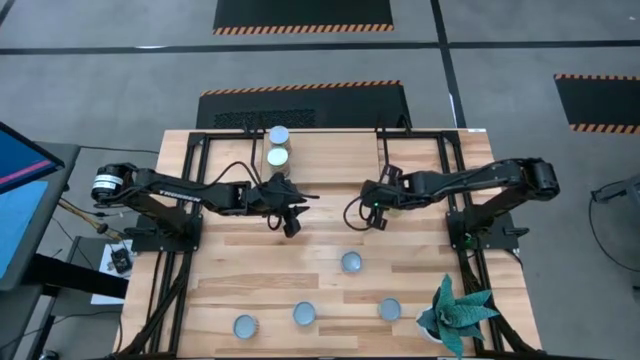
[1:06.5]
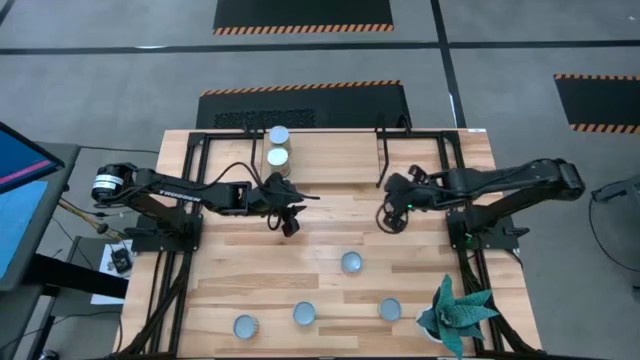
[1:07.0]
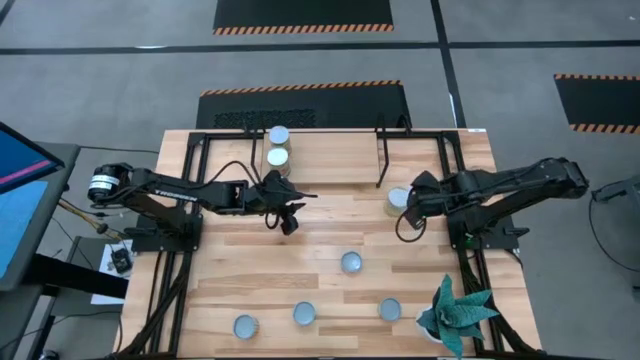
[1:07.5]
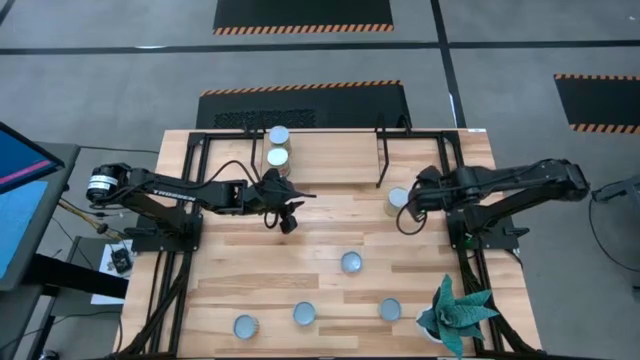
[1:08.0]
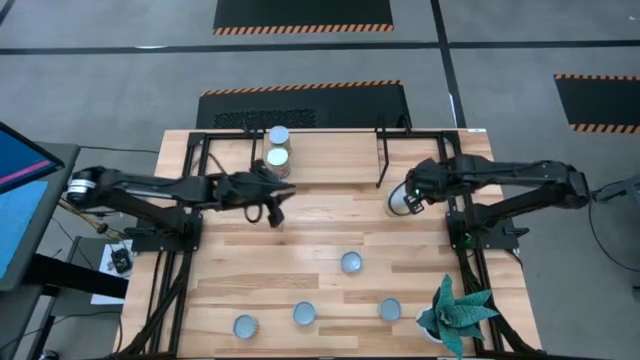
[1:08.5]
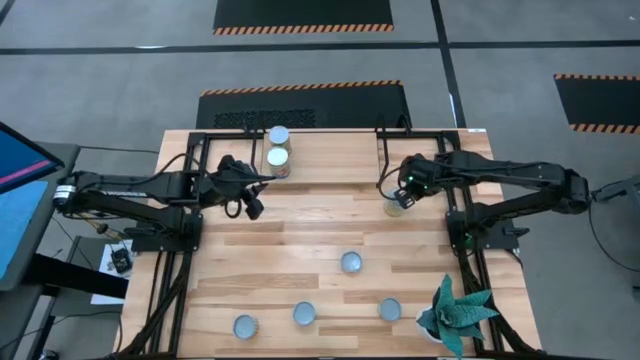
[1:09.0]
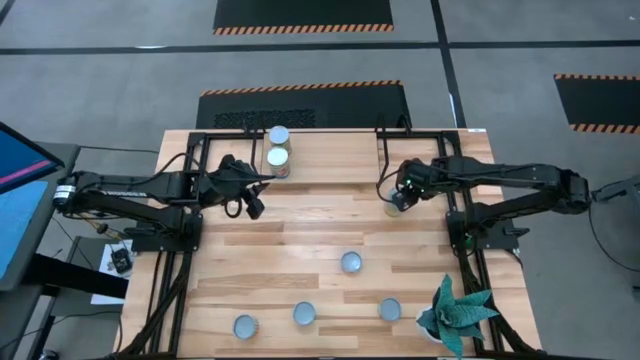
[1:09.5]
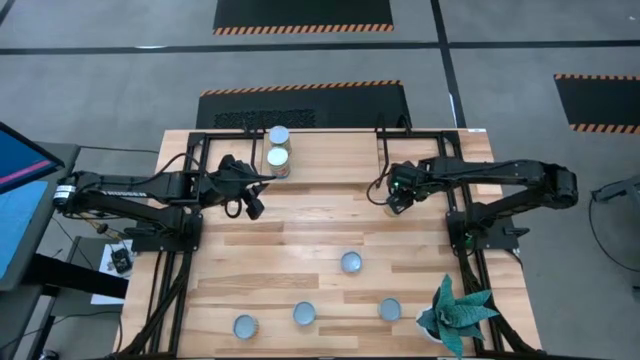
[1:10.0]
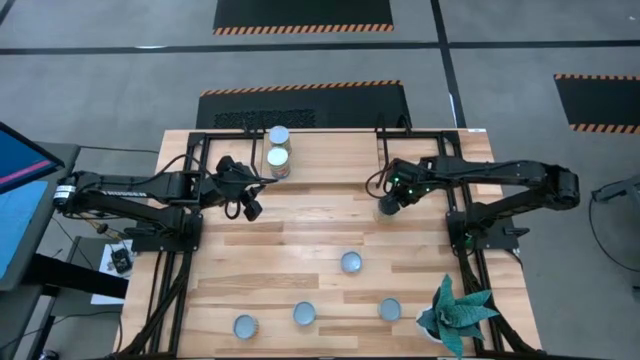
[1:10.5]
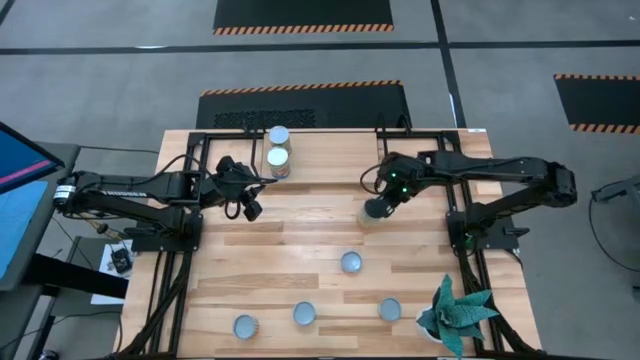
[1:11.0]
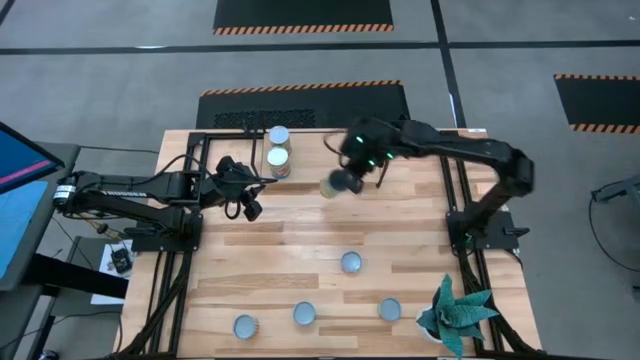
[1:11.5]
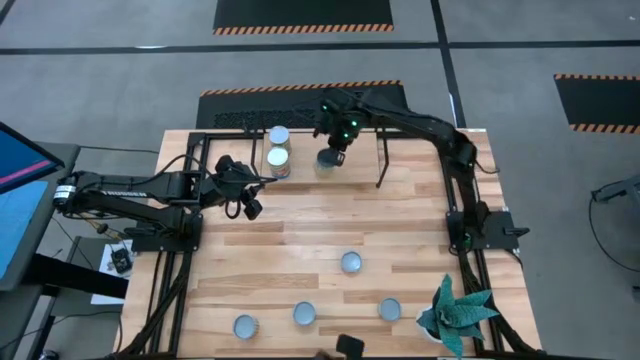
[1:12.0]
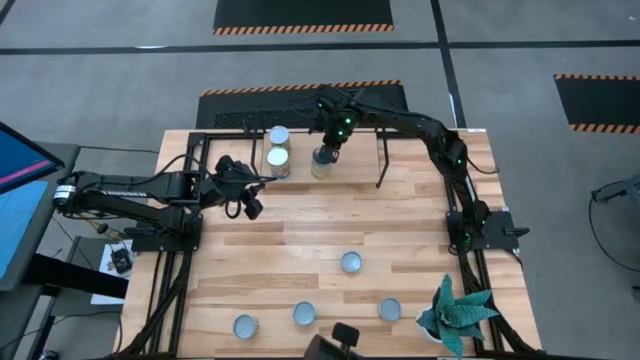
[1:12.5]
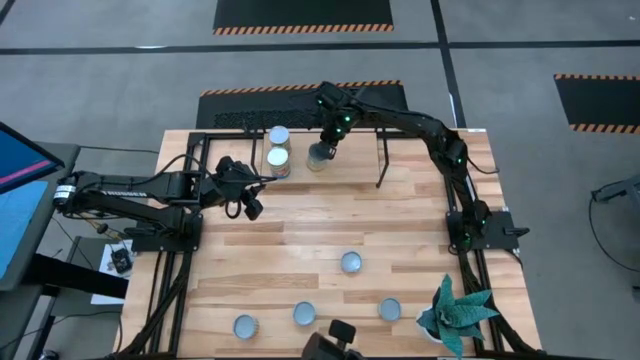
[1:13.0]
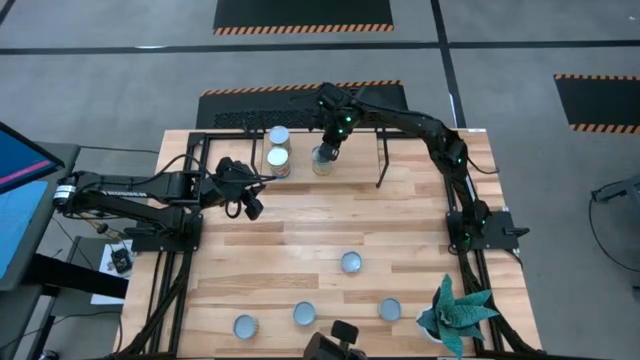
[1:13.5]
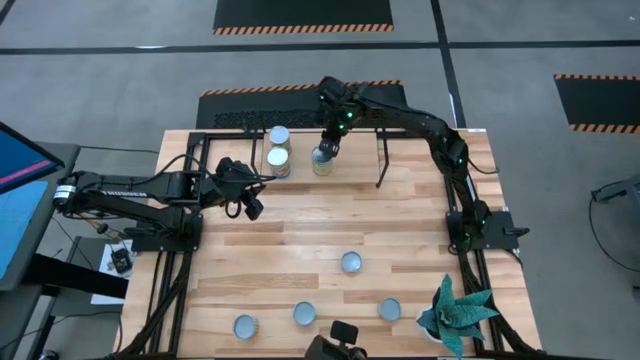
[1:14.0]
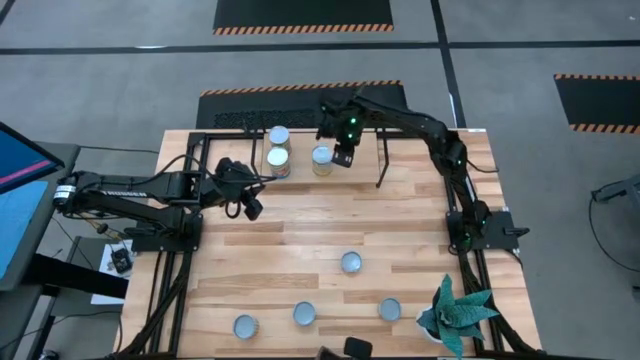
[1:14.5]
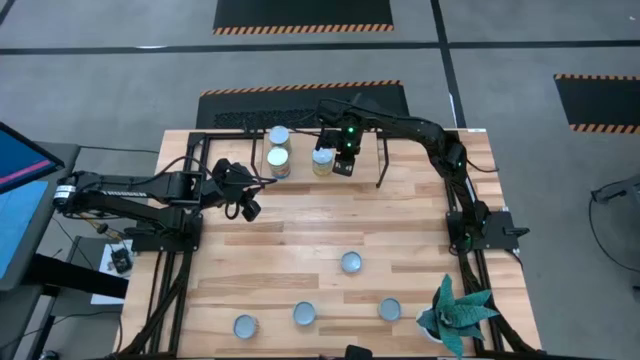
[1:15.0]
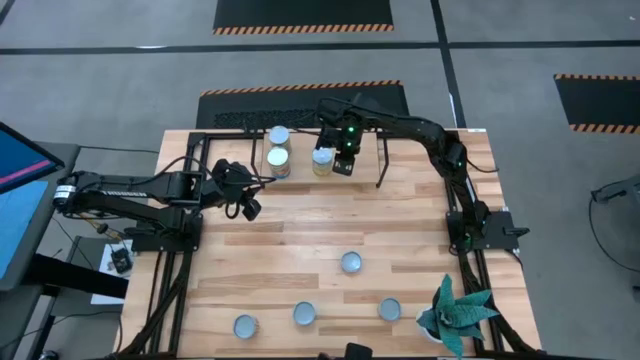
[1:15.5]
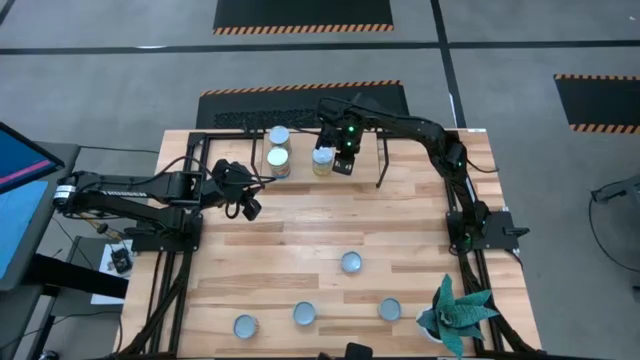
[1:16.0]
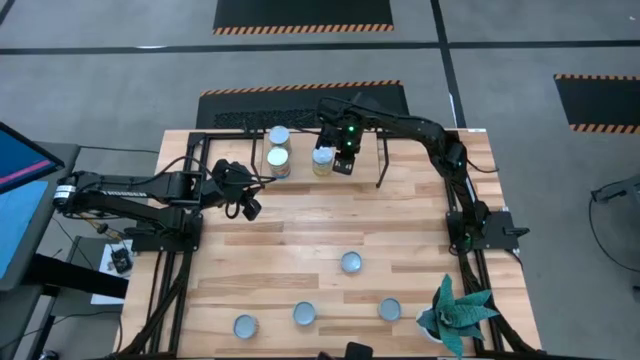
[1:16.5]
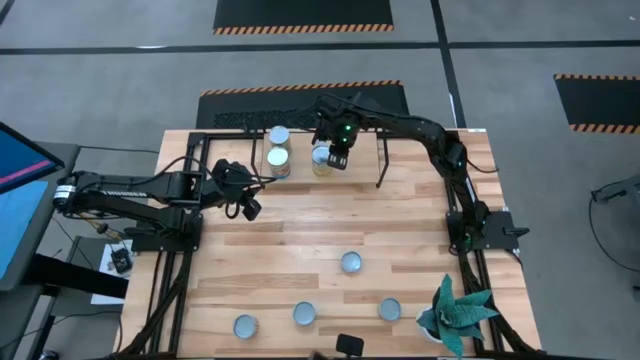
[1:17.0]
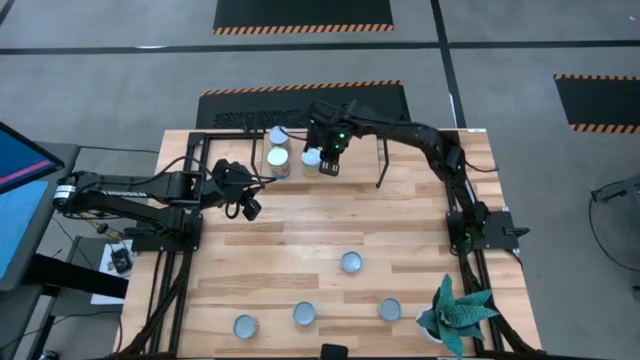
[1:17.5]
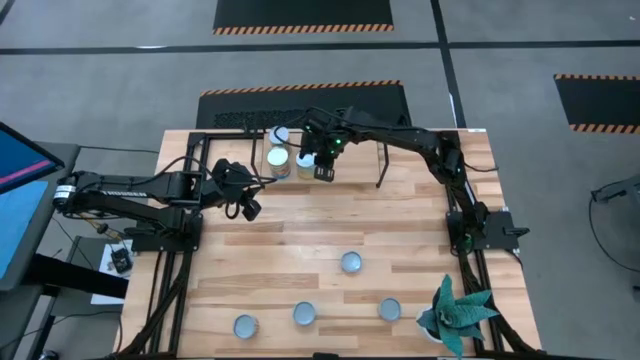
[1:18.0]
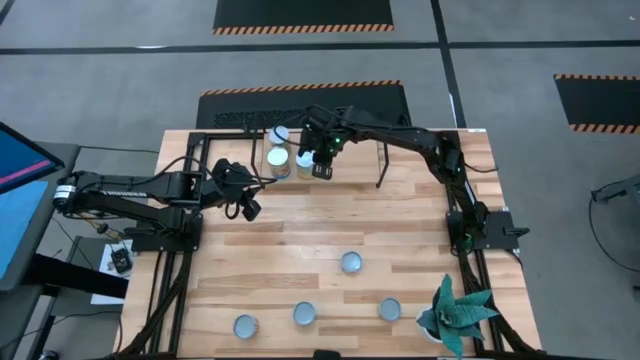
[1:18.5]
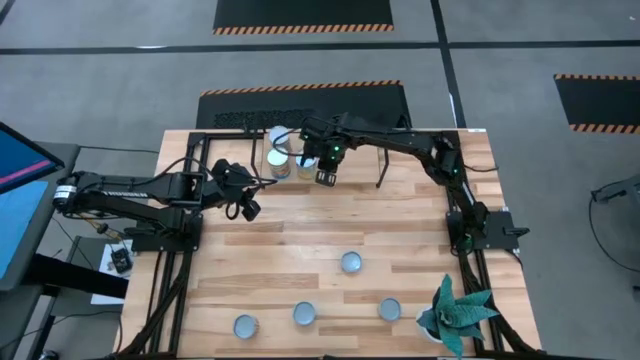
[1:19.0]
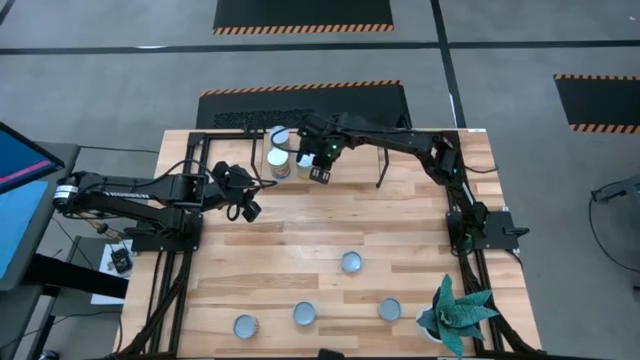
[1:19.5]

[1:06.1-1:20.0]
Task: Pick and place cans onto a shelf
Put the canned carrots on the shelf

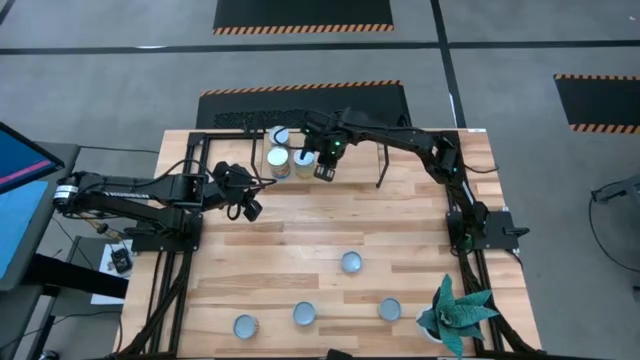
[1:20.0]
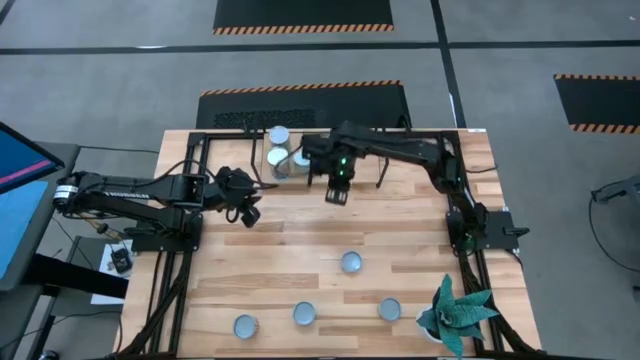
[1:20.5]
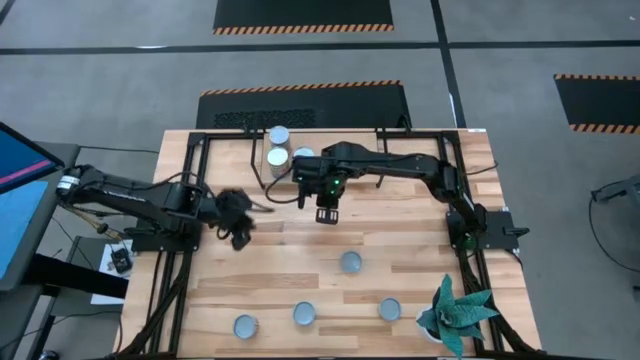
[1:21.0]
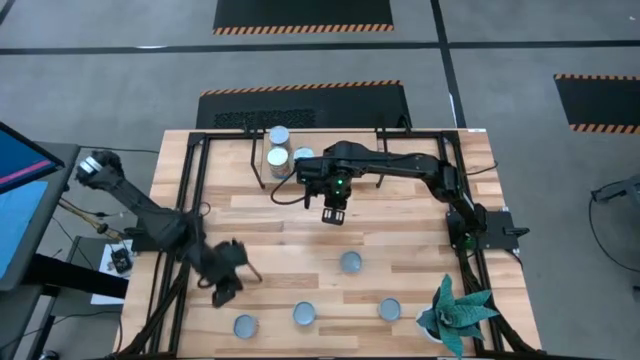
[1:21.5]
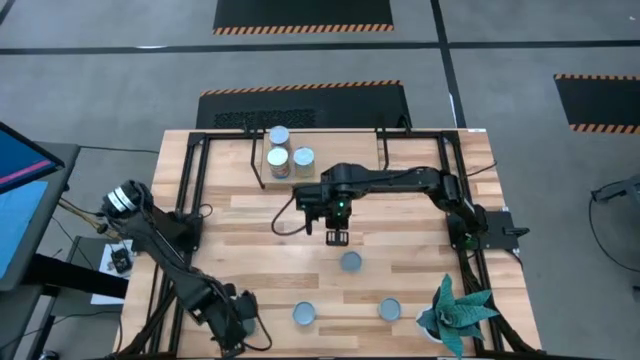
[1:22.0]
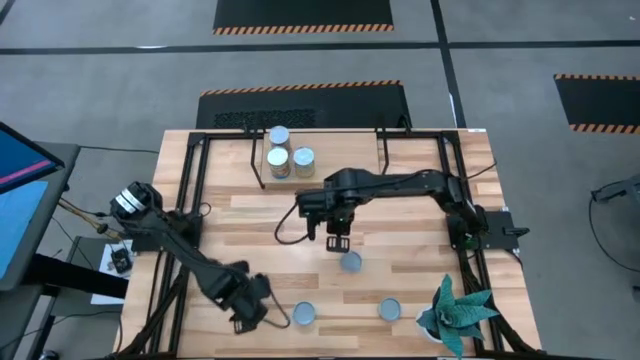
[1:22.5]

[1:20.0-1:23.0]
Move the canned black beans to the middle left

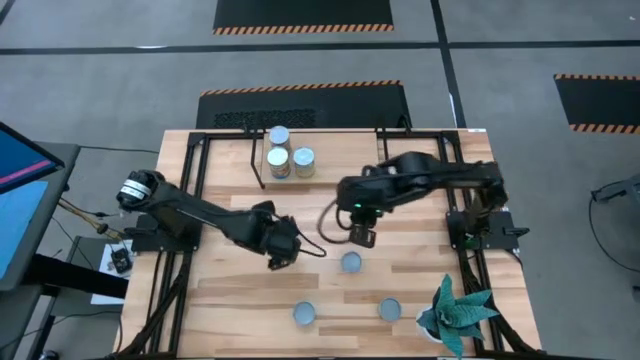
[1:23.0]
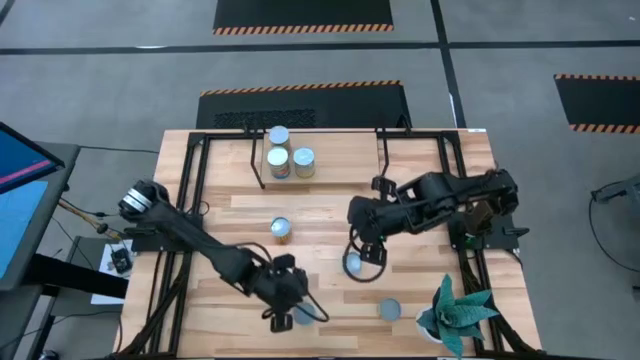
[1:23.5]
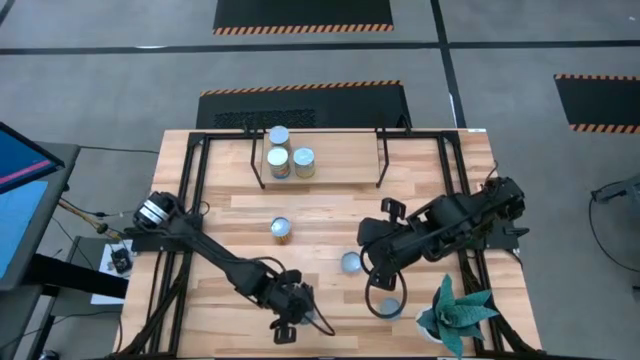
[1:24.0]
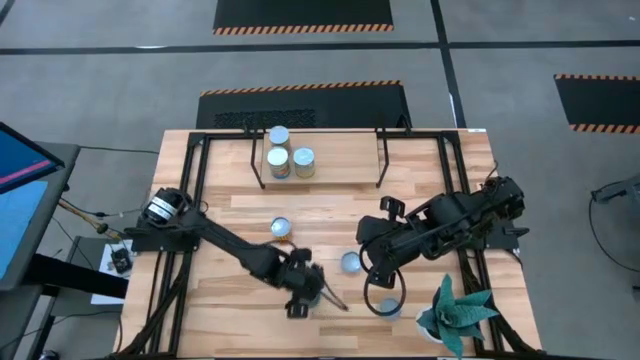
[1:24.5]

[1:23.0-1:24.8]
Move the canned peas to the middle

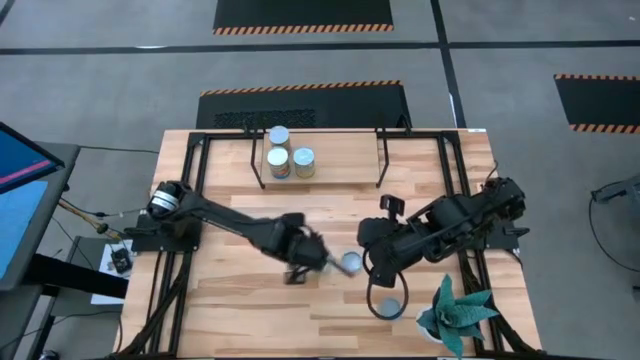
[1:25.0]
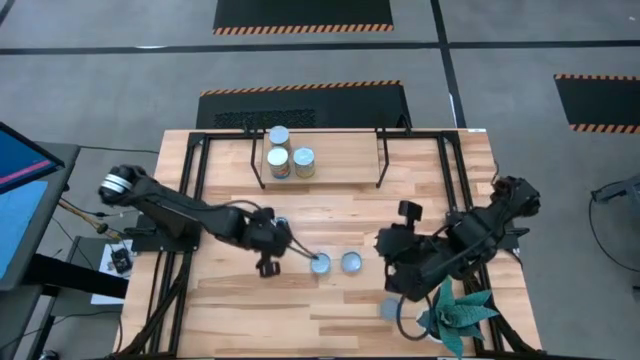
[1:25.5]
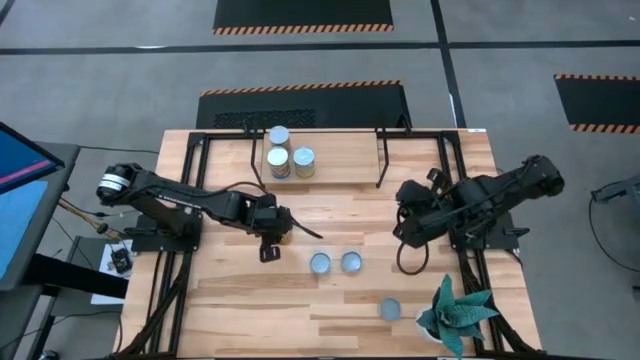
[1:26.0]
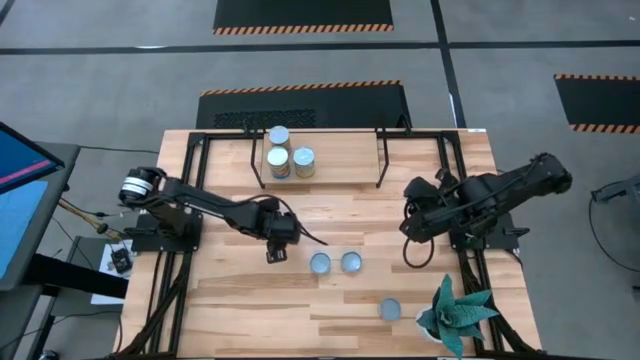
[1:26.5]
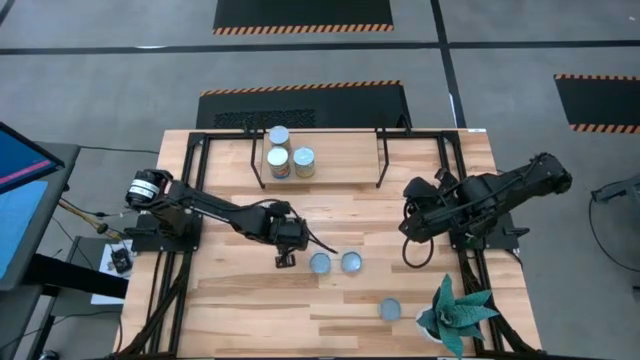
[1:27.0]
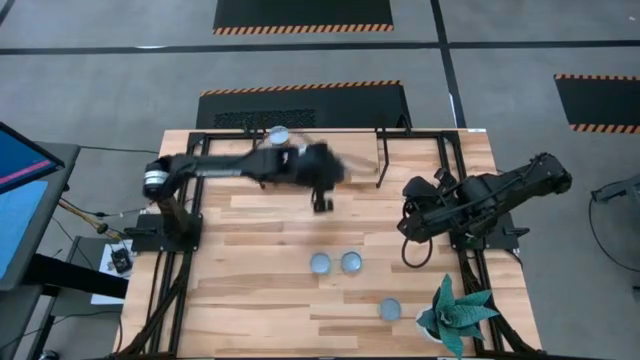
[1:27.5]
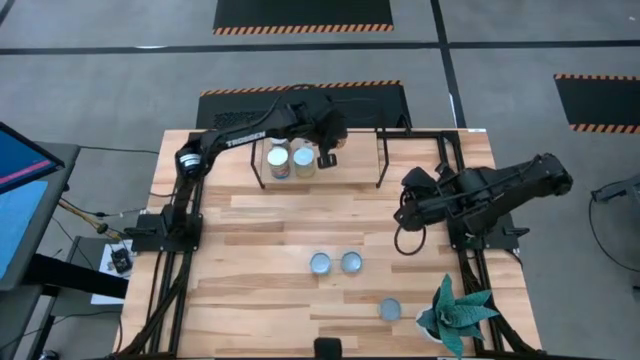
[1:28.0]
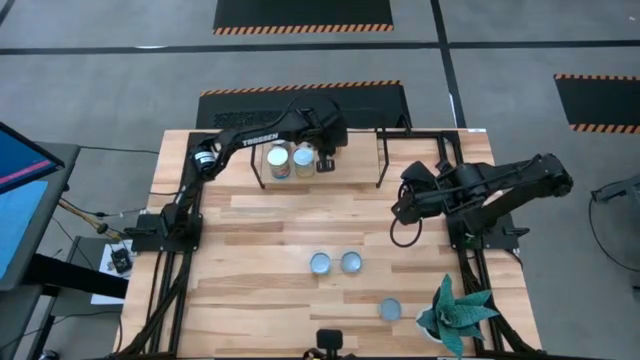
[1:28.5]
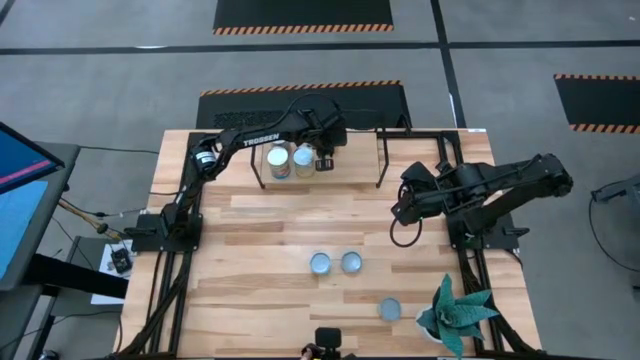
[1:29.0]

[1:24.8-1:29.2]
Put the canned black beans on the shelf
